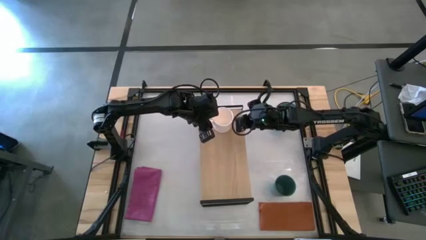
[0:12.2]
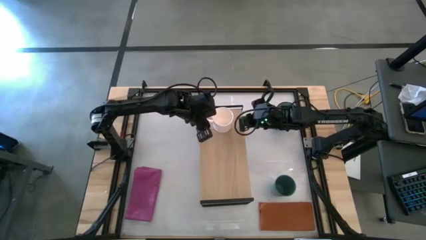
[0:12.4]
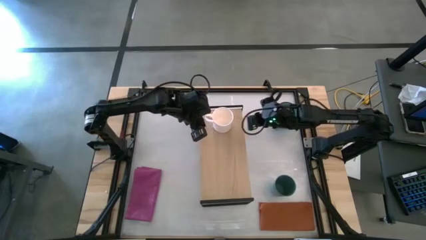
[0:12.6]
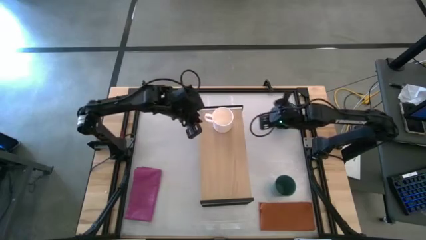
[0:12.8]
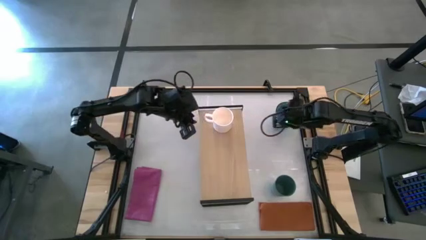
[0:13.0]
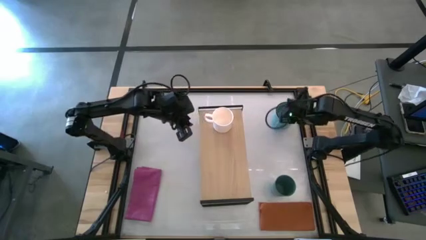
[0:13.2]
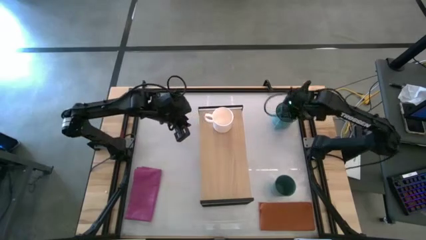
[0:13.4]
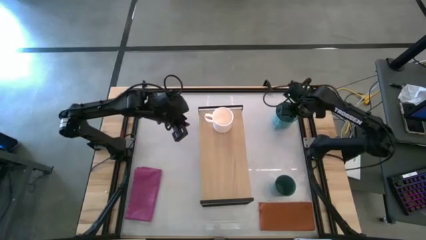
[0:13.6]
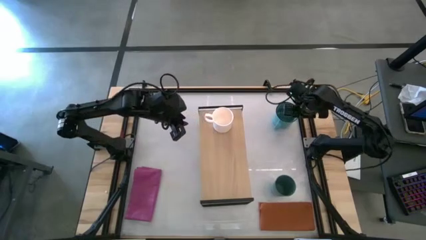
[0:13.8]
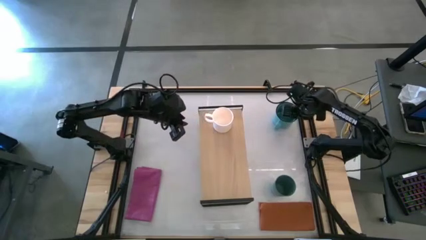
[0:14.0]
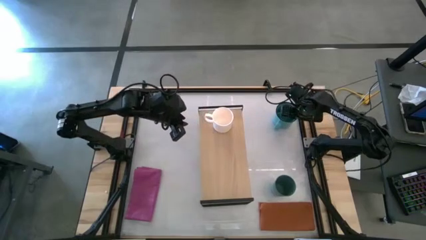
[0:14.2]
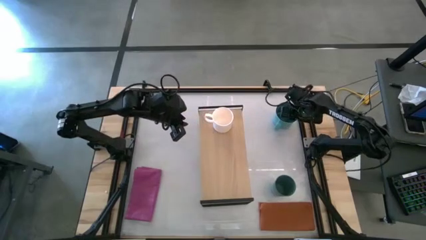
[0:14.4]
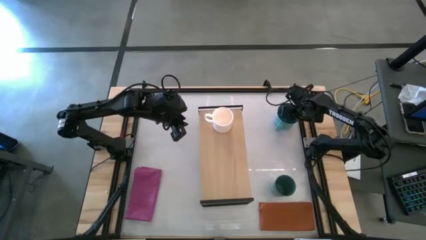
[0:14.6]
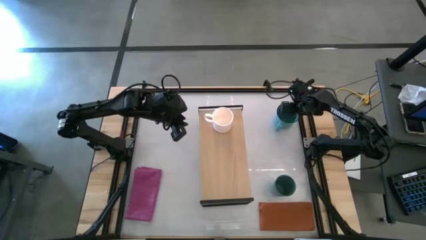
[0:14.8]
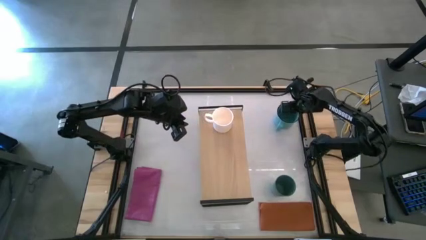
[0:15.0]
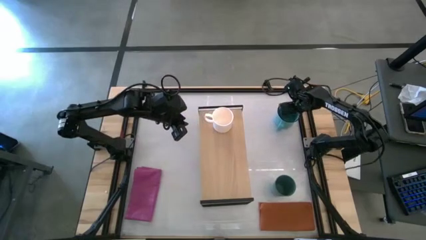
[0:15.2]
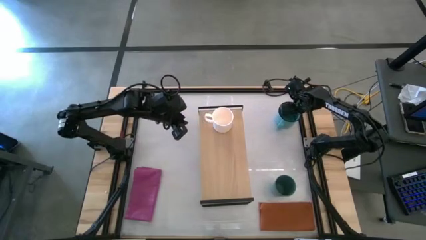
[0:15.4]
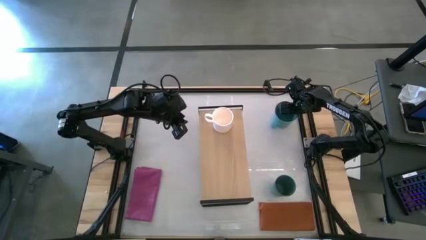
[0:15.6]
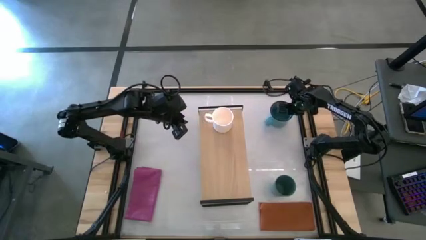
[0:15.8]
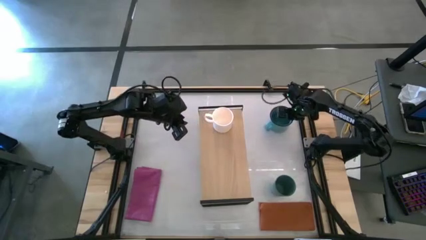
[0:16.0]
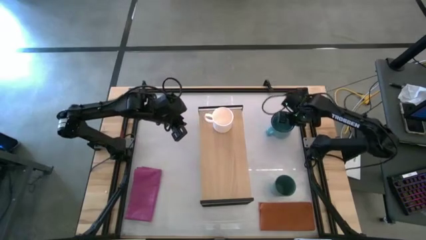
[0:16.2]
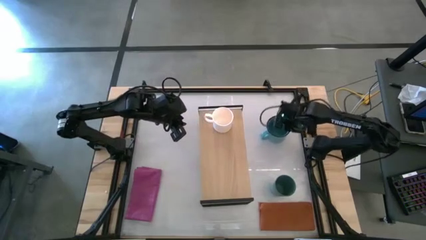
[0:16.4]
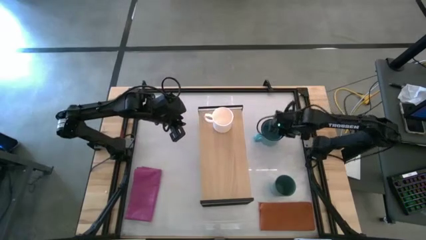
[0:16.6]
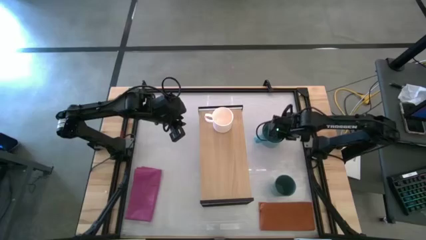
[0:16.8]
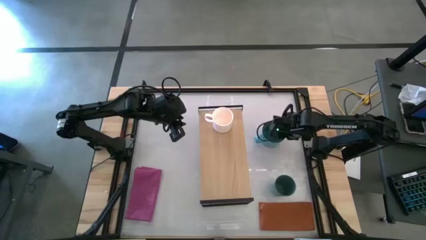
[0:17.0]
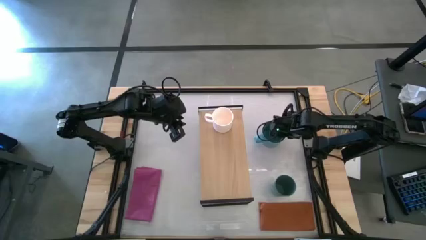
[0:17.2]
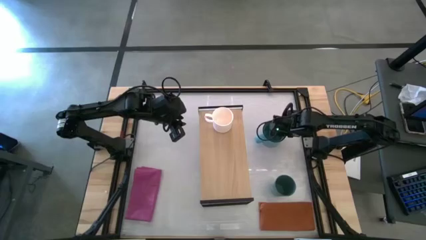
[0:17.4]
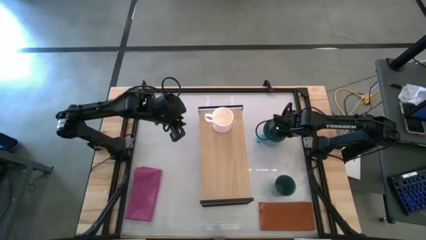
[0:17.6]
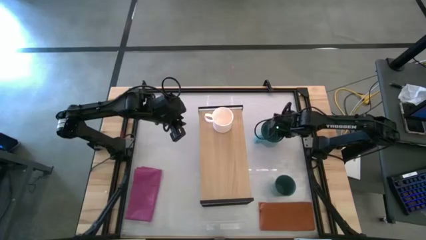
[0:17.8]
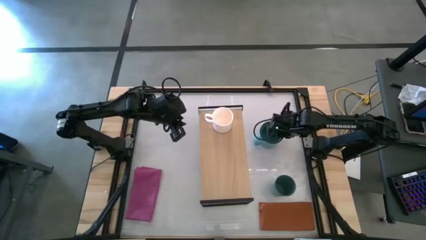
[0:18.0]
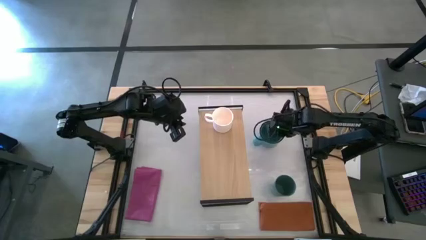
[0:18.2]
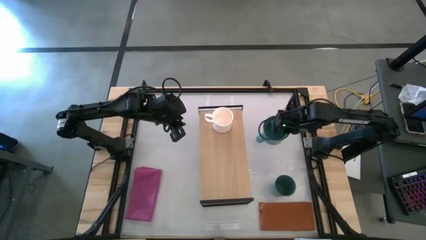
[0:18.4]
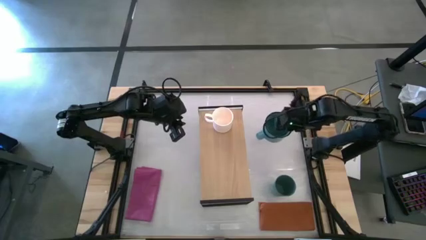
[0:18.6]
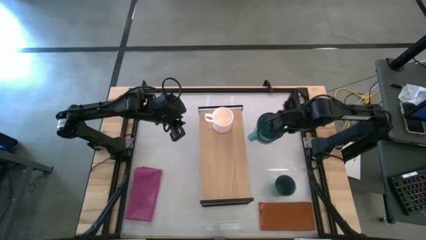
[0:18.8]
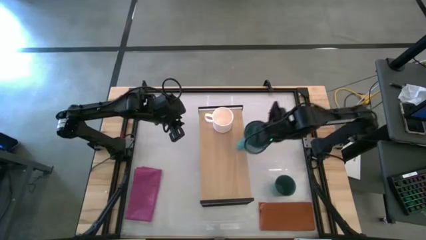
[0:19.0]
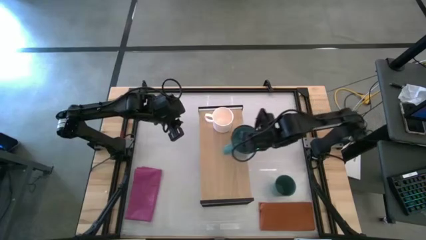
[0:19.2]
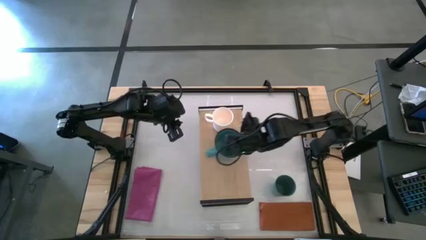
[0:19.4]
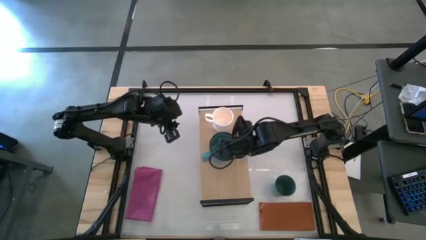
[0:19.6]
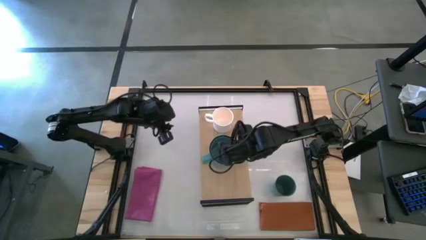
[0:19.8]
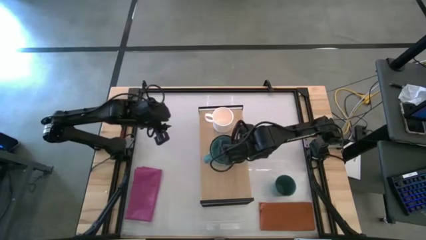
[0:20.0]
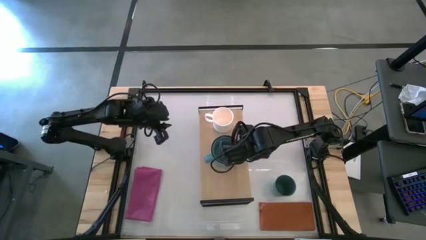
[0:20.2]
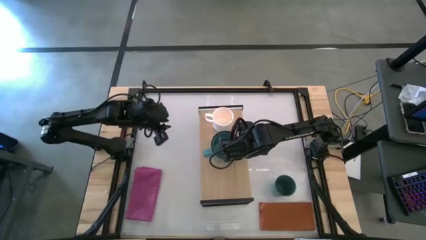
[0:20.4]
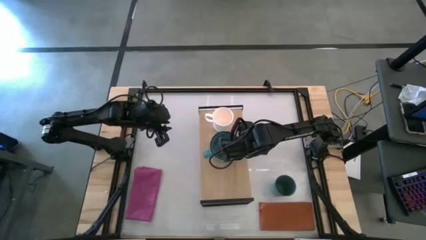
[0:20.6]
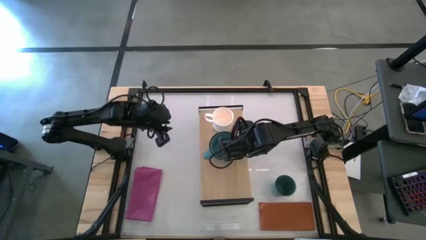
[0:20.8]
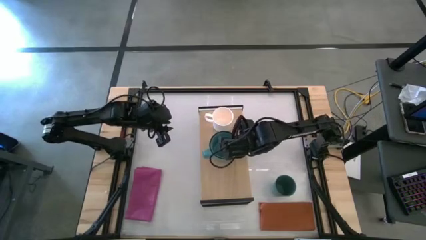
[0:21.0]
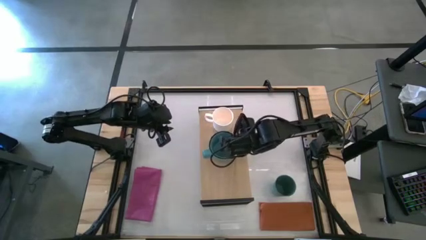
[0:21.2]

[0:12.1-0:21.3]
Task: Stack small to large cups/mugs on shelf
Put the blue mug on the shelf

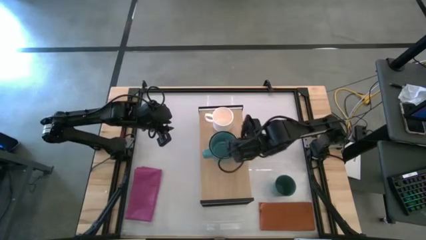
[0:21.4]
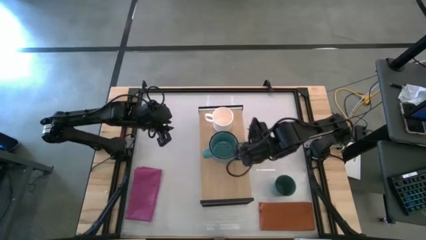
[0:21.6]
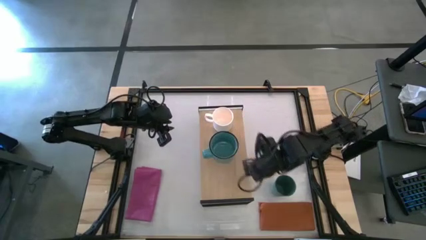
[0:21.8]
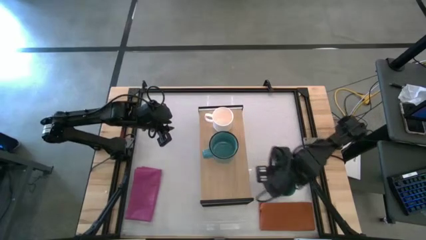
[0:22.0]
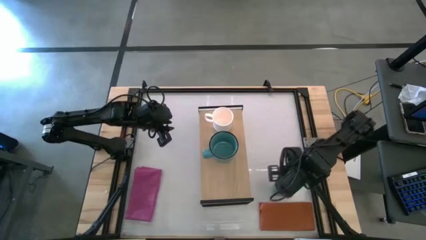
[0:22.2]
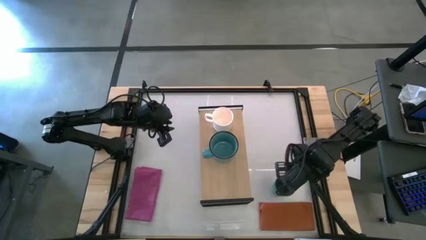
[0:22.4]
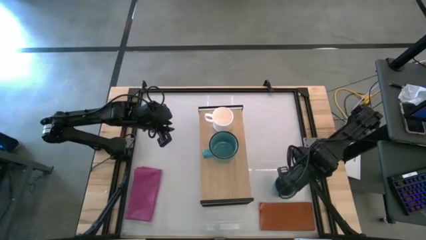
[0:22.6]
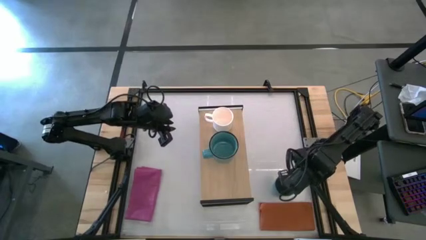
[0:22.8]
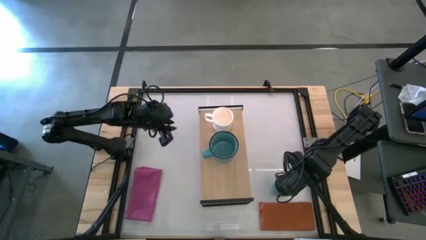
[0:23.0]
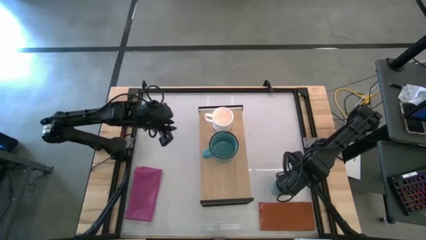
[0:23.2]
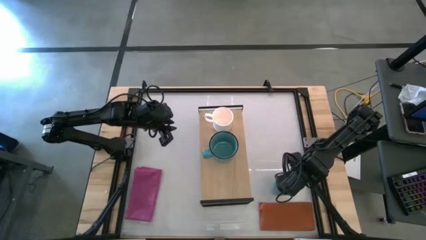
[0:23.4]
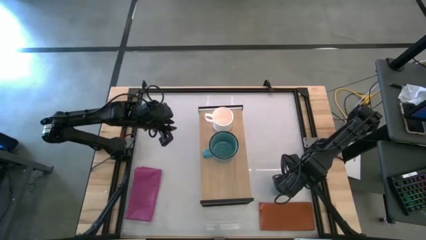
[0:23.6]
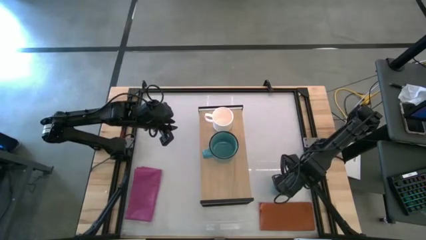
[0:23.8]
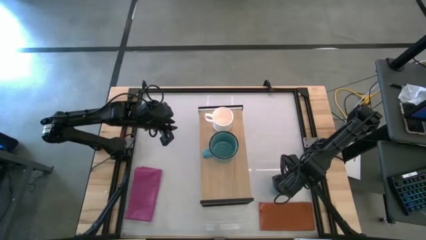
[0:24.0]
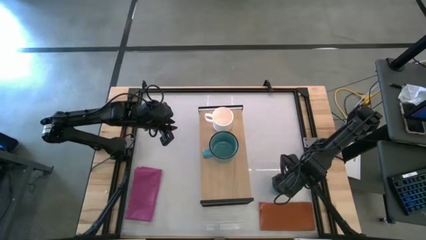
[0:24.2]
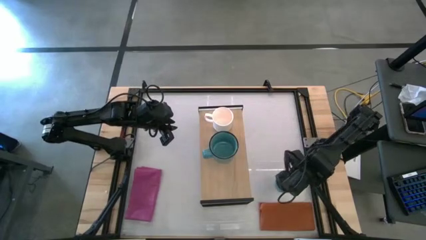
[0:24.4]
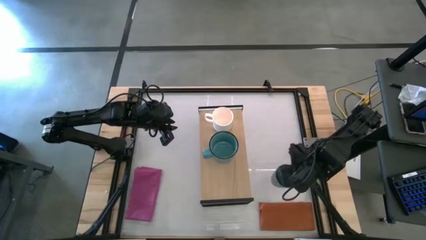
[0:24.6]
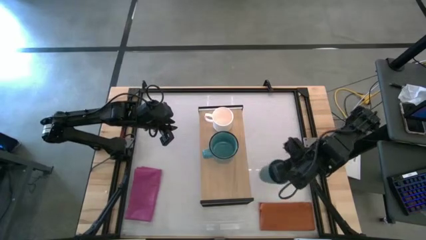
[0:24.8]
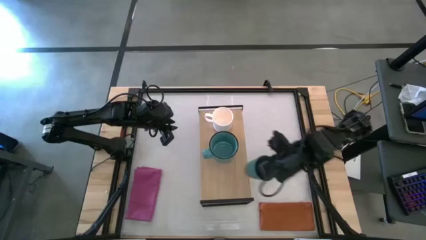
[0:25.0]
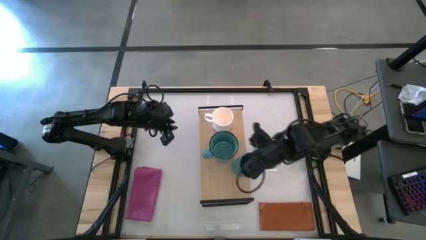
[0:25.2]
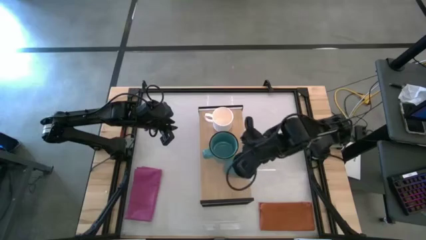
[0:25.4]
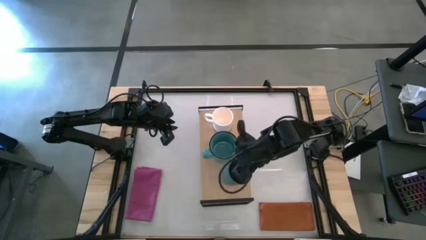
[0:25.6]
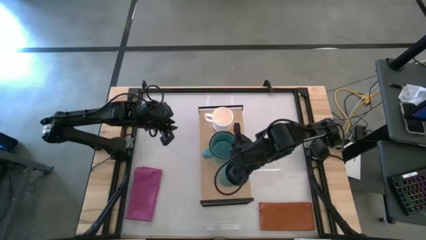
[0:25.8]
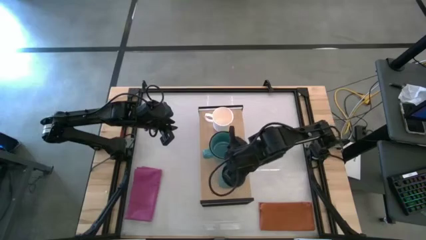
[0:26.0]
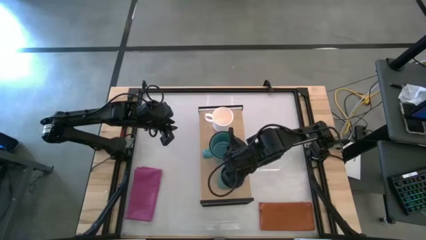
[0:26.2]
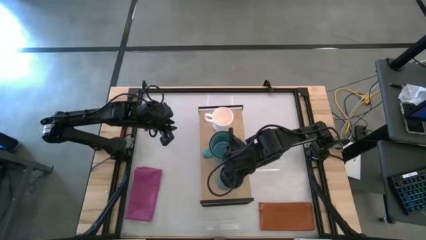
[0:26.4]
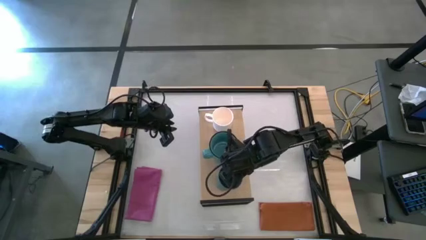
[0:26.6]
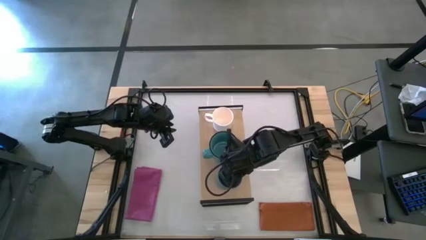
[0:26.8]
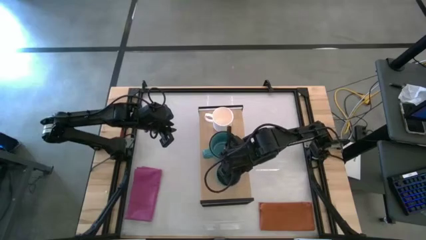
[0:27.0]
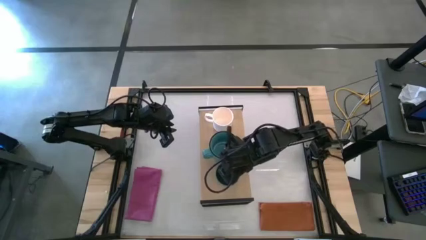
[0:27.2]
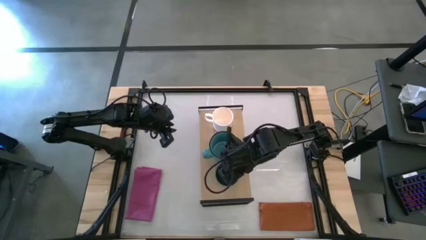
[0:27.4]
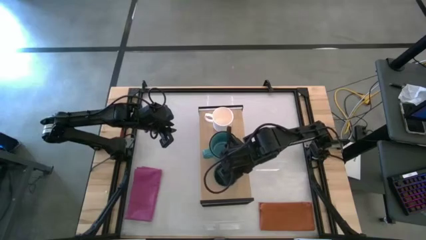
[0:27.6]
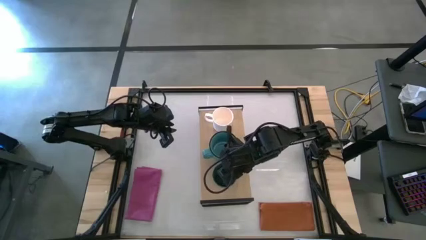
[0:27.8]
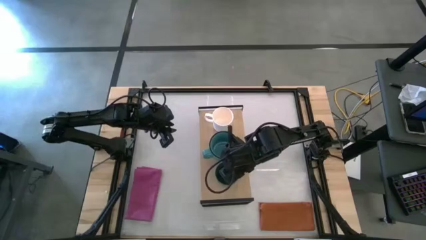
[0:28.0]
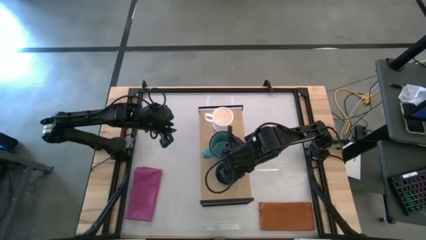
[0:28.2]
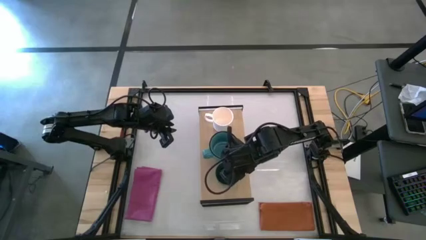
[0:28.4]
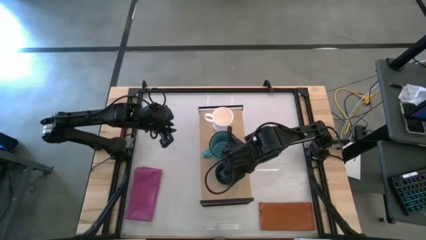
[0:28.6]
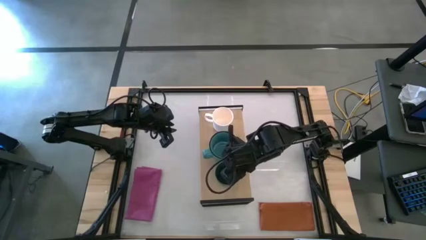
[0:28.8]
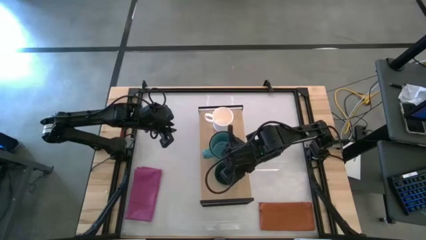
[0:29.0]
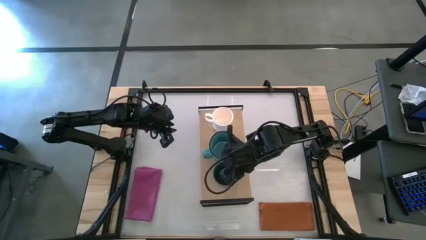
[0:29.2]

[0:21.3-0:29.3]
Put the green cup on the shelf
